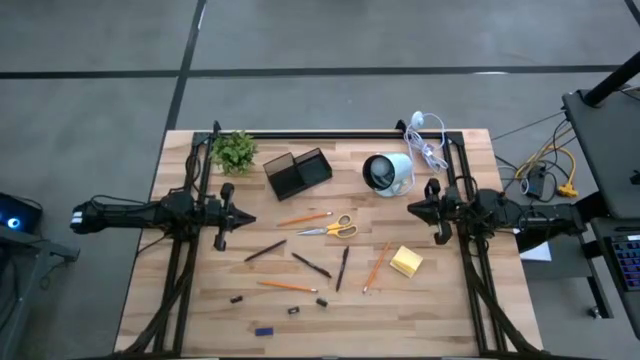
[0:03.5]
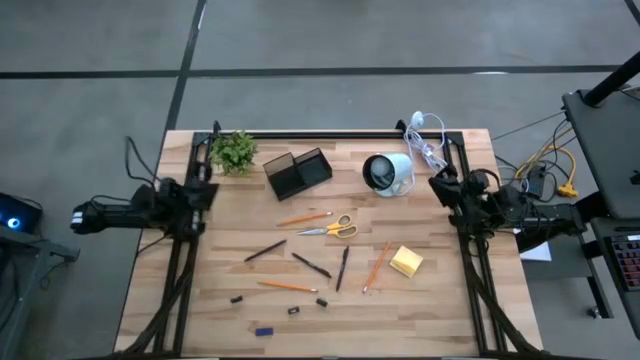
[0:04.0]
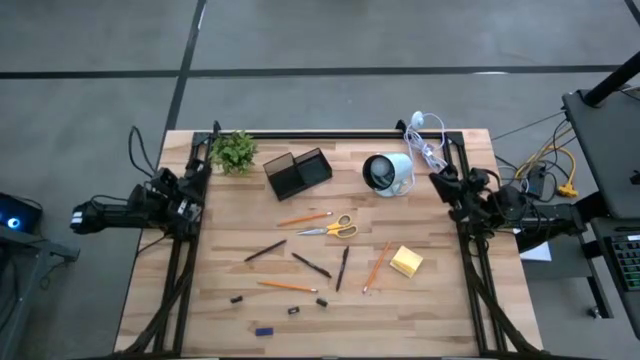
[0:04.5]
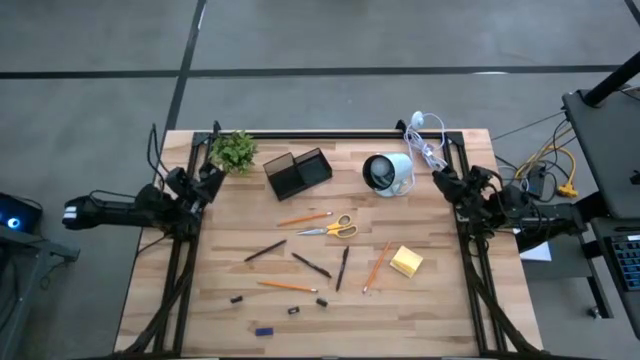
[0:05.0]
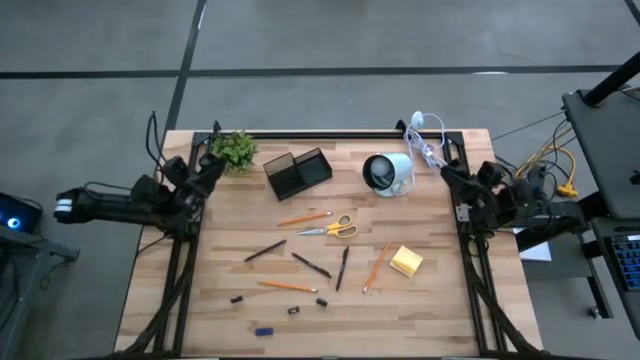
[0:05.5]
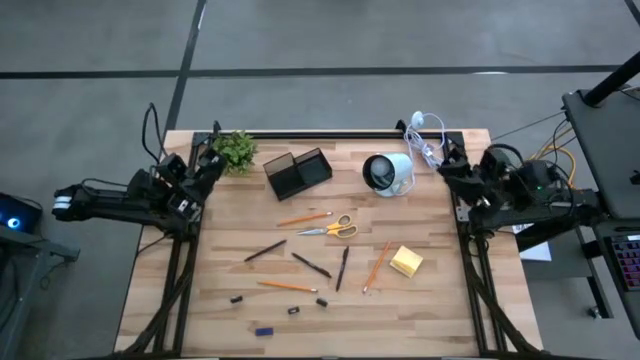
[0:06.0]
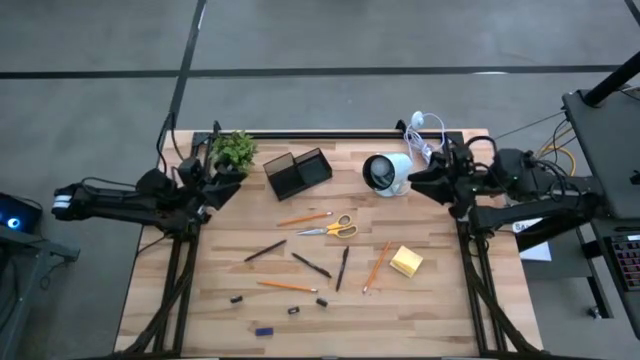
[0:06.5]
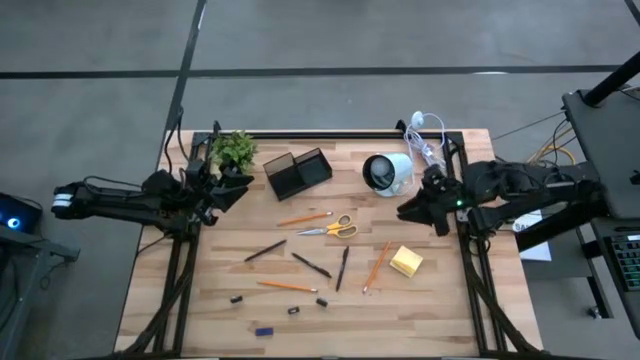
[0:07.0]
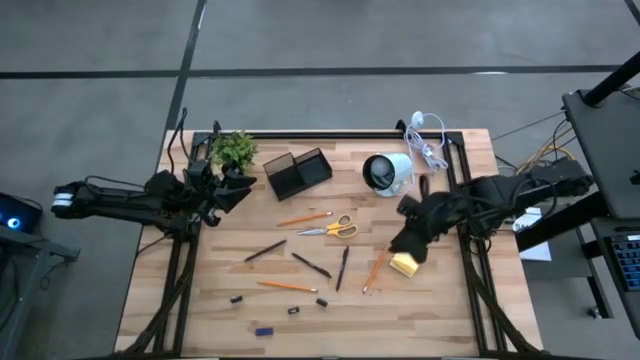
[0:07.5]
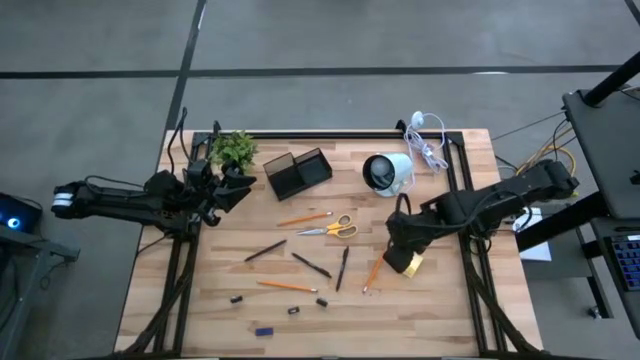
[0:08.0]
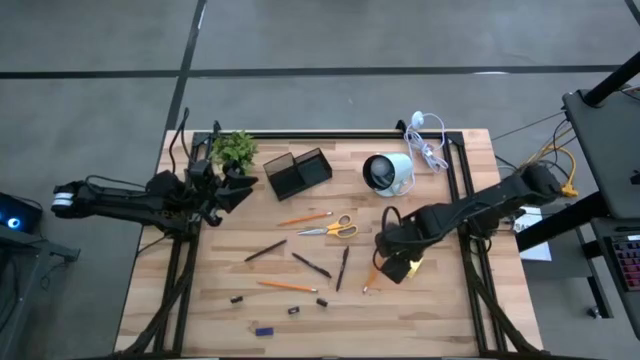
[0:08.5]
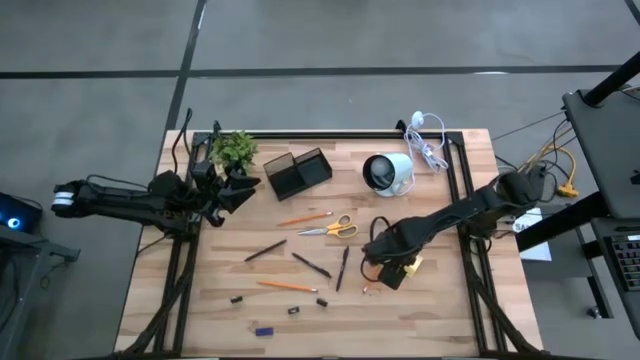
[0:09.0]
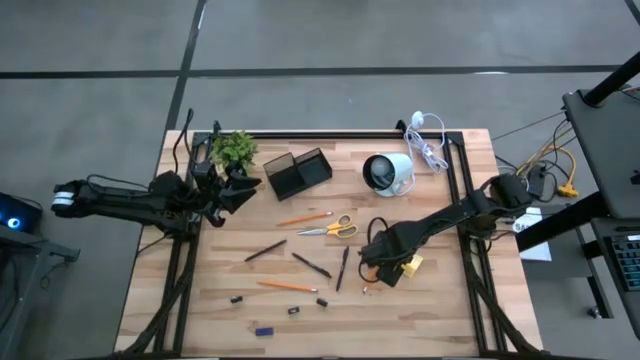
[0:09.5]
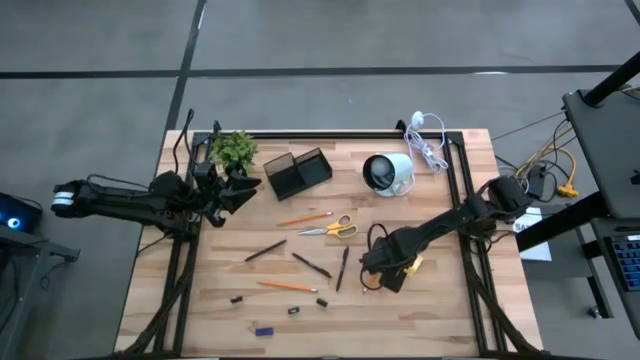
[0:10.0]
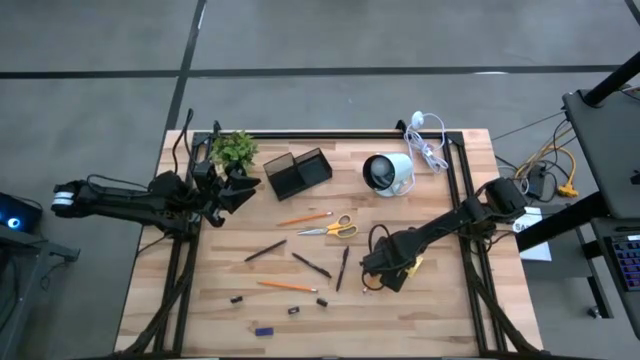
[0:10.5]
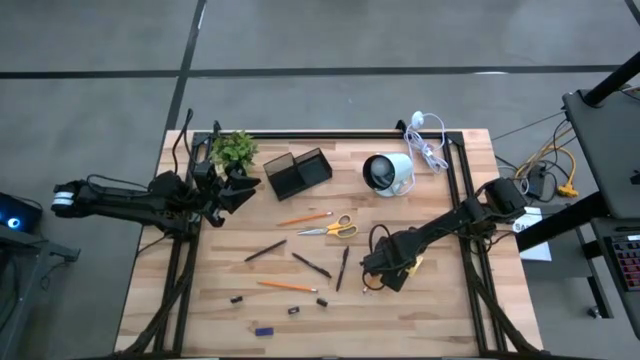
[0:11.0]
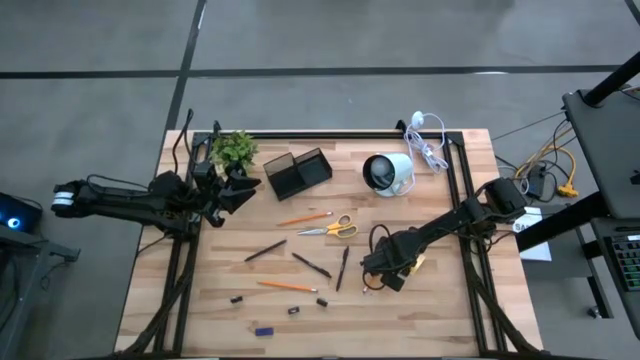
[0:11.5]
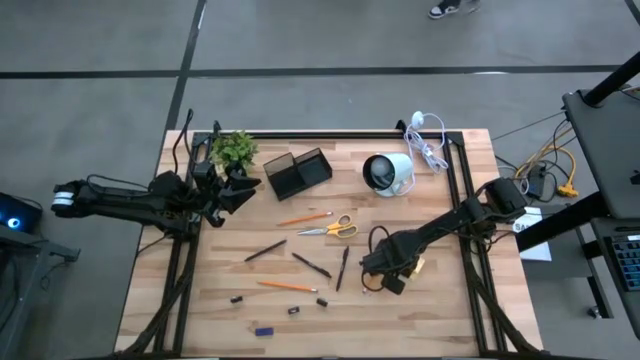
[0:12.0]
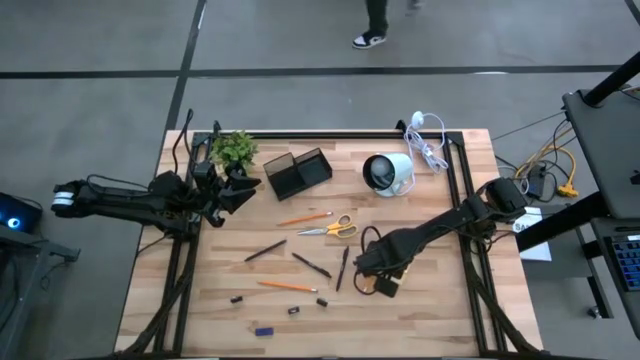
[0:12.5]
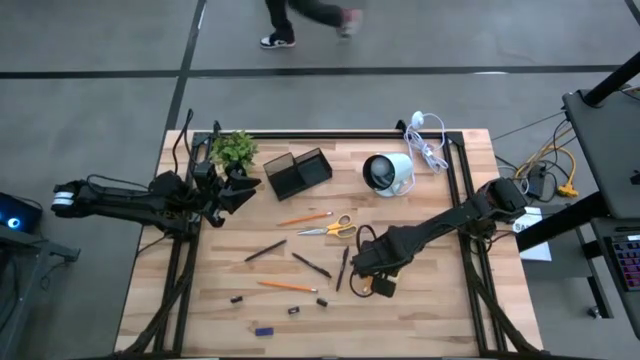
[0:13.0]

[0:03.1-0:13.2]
Task: Pick and place office supplies into organizer
Put the yellow sticky note into the black desk organizer

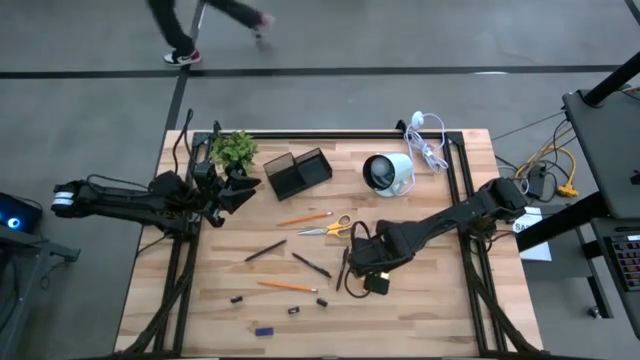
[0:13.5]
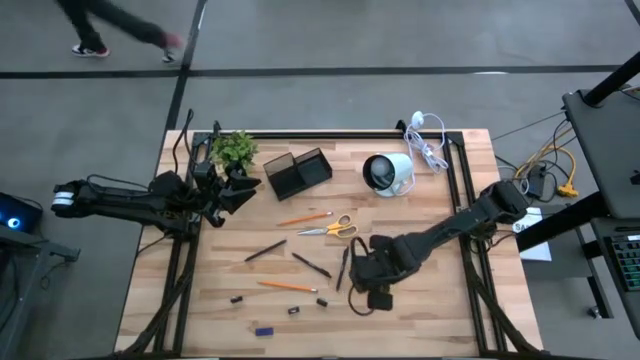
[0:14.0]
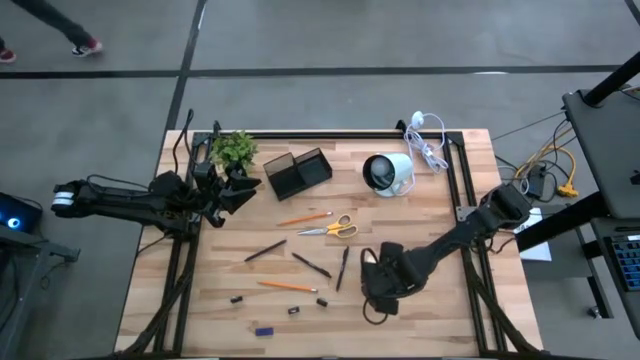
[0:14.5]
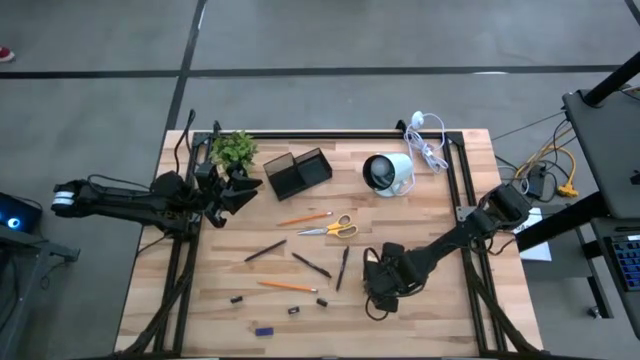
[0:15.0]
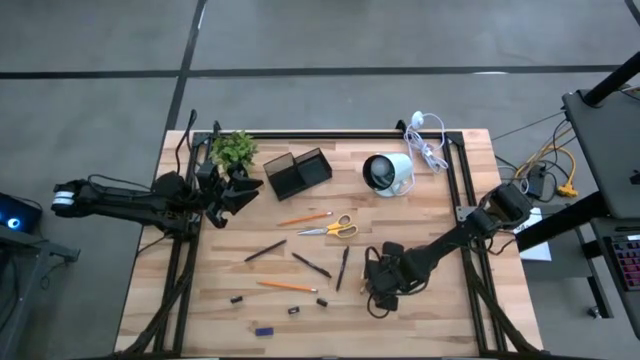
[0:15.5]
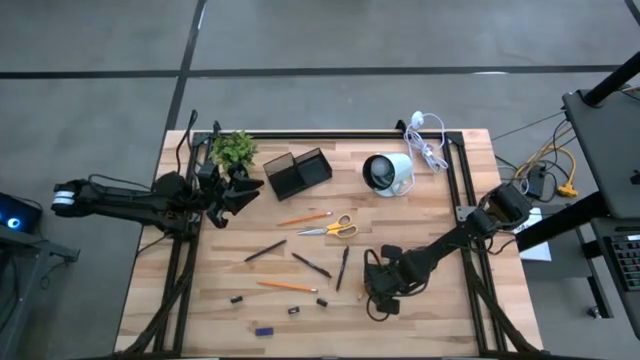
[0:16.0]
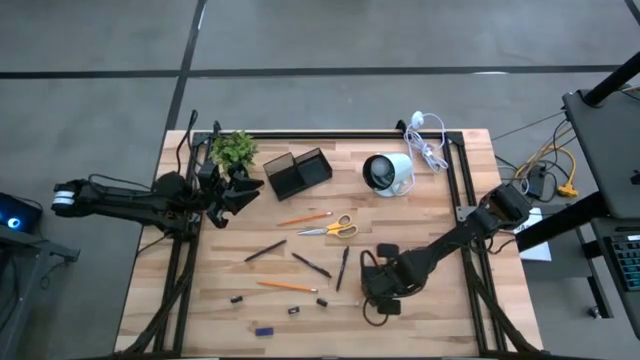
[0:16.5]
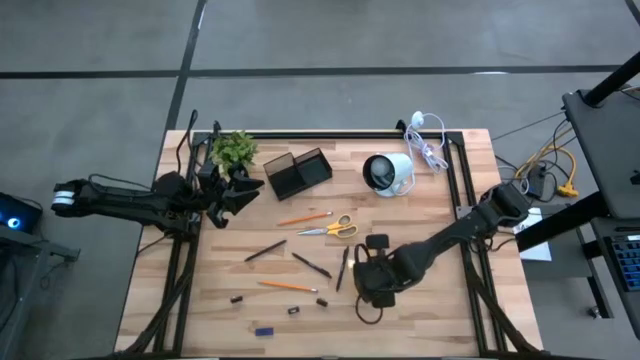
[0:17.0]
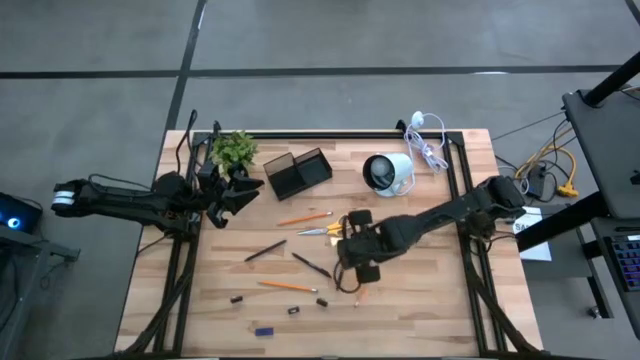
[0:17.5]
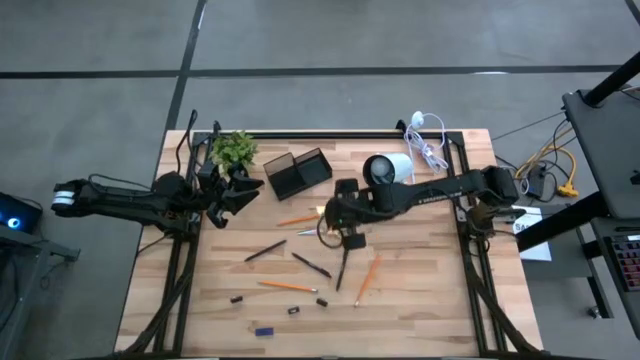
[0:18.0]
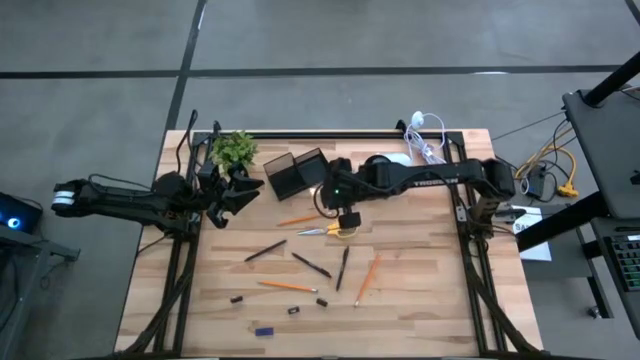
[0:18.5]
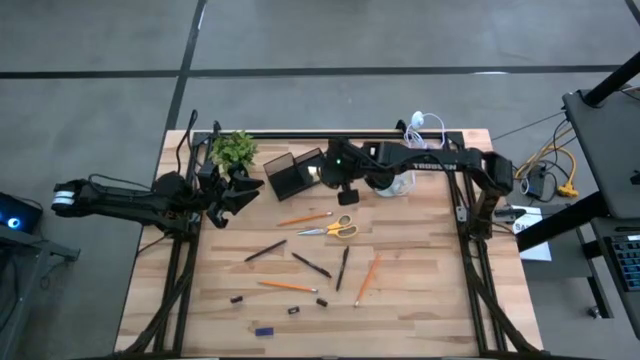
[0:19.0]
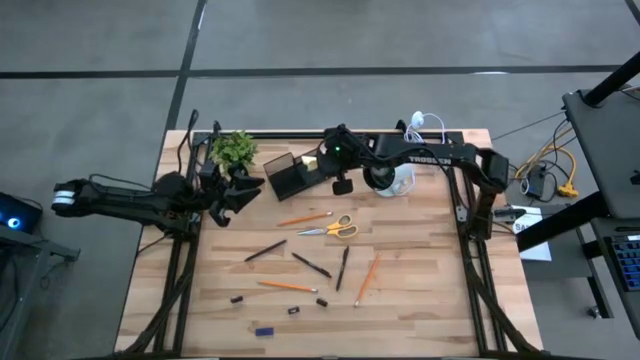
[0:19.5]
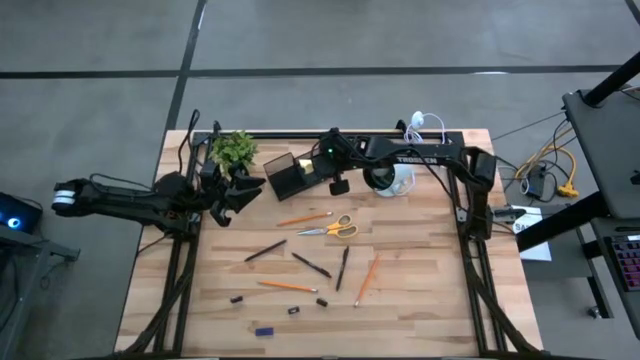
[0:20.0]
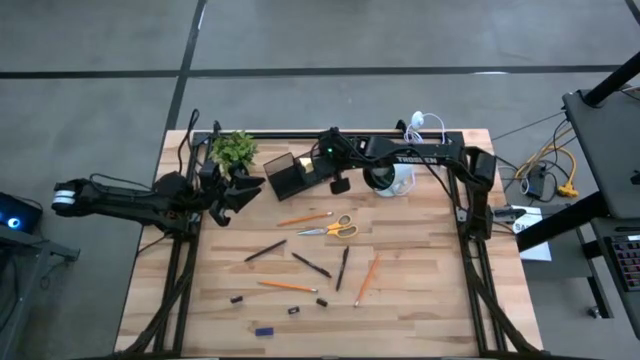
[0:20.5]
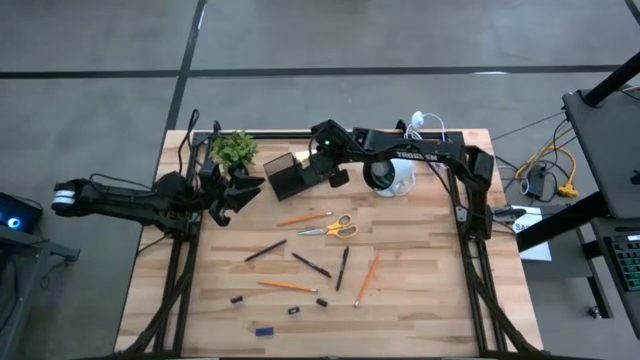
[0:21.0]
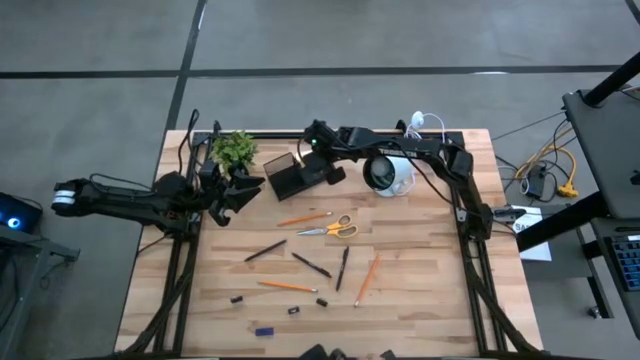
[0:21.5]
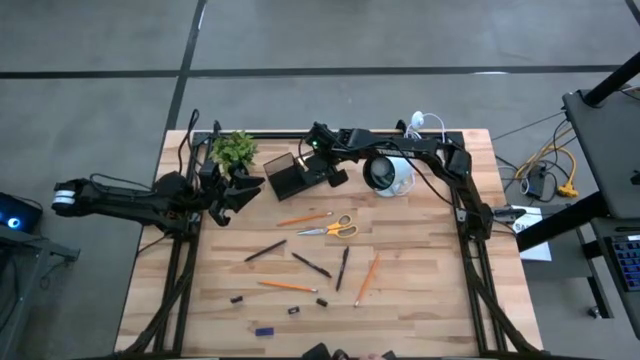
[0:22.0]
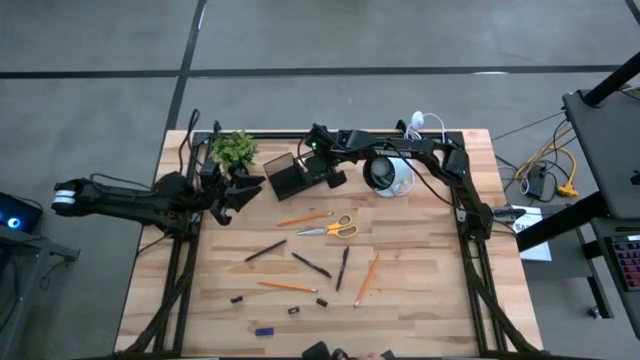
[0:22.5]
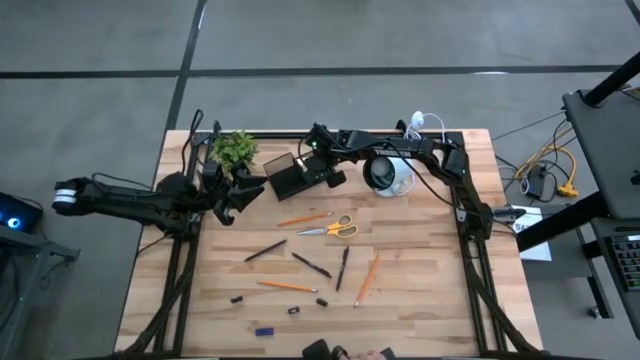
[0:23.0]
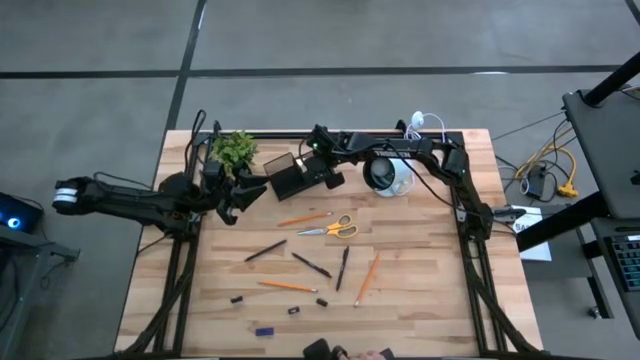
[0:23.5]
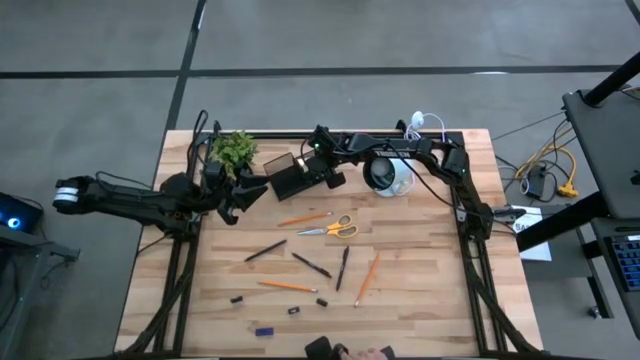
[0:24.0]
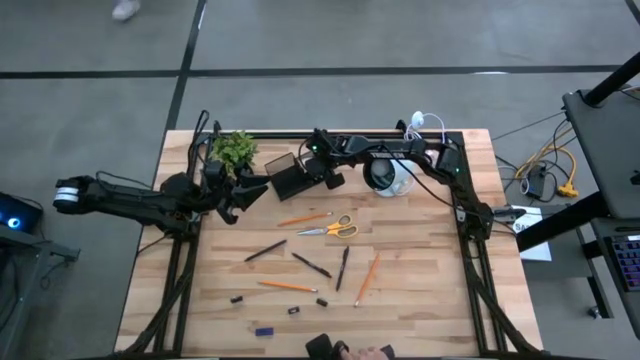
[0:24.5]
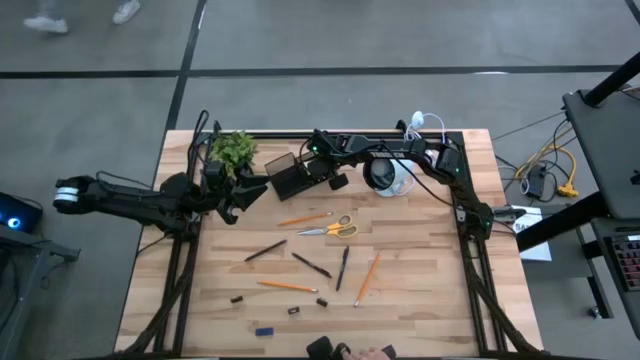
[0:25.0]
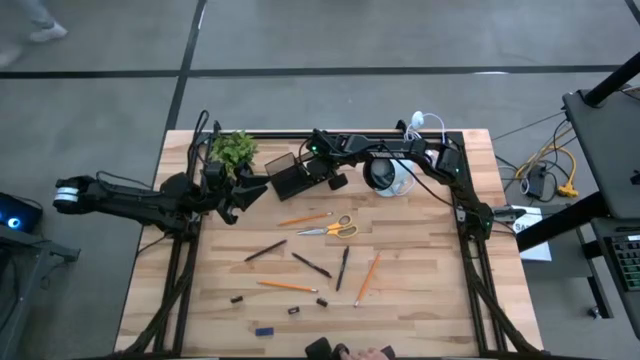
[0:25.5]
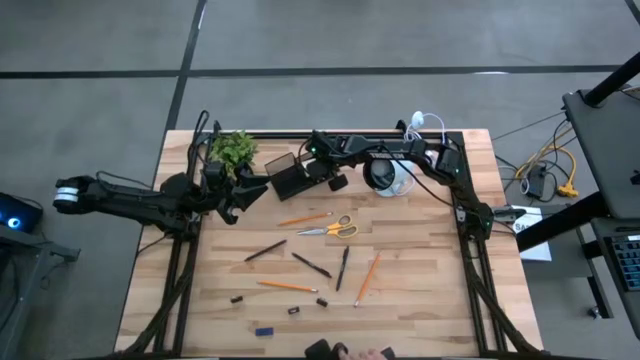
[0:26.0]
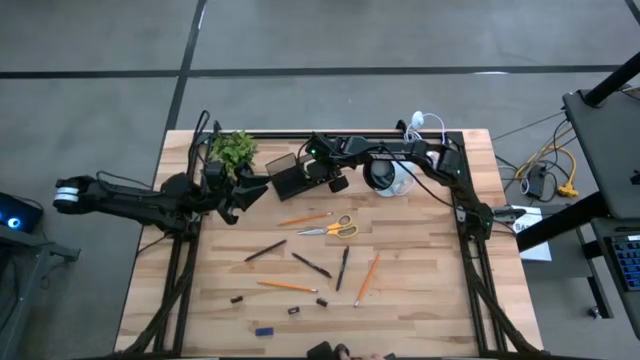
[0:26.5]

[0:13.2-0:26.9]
Put the yellow sticky note into the black desk organizer
